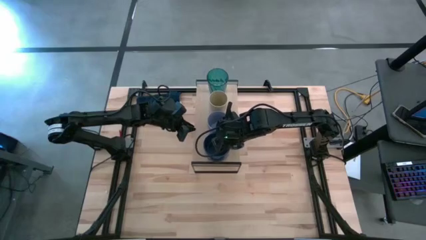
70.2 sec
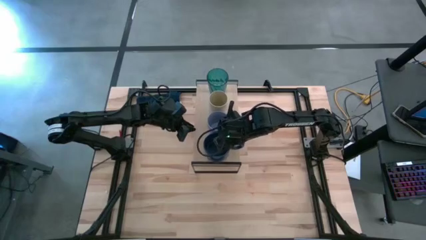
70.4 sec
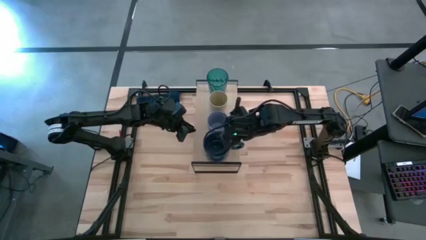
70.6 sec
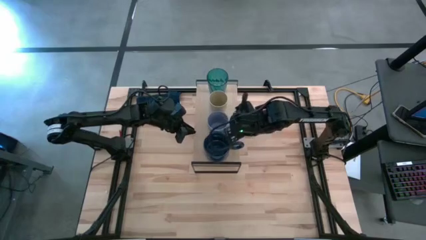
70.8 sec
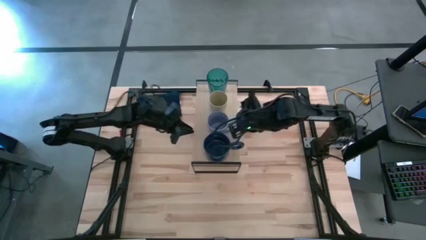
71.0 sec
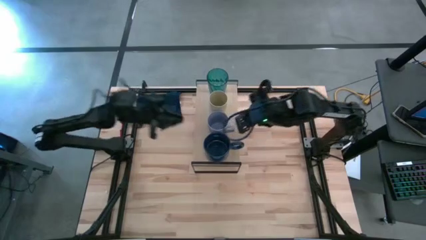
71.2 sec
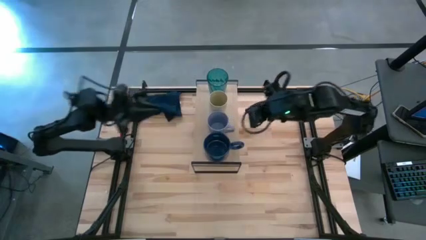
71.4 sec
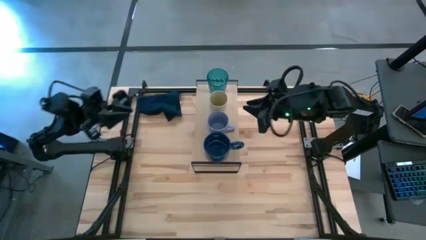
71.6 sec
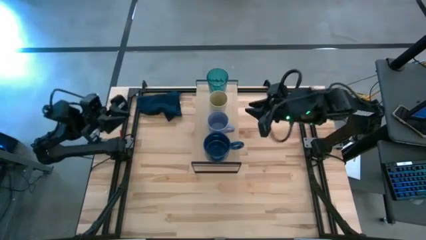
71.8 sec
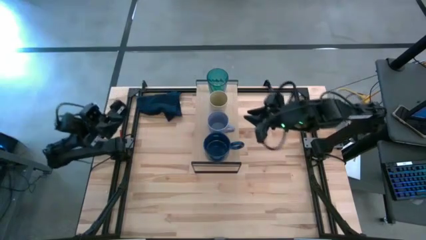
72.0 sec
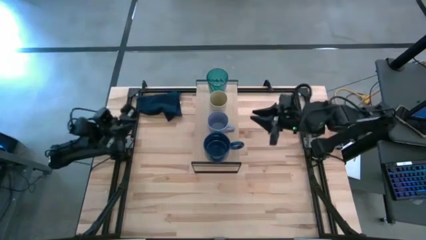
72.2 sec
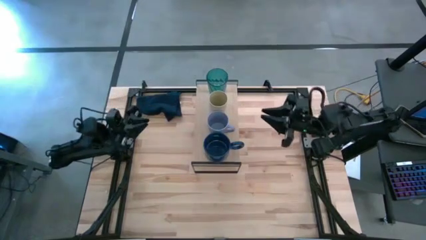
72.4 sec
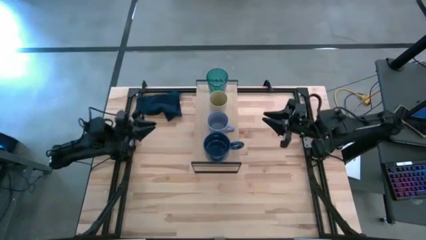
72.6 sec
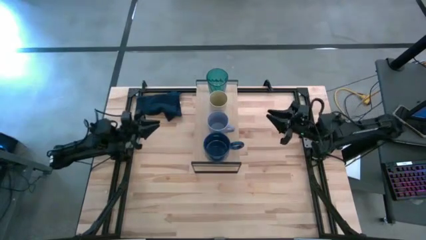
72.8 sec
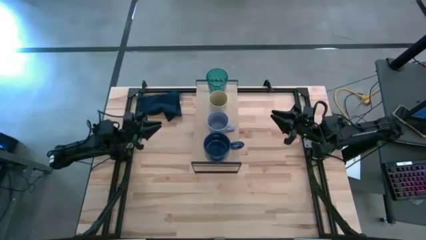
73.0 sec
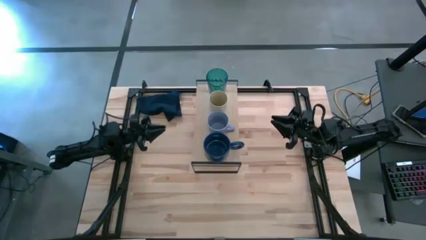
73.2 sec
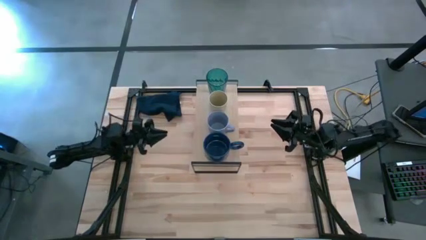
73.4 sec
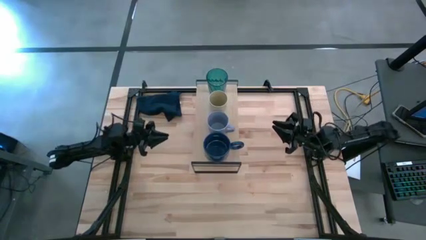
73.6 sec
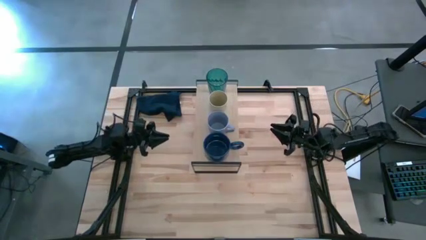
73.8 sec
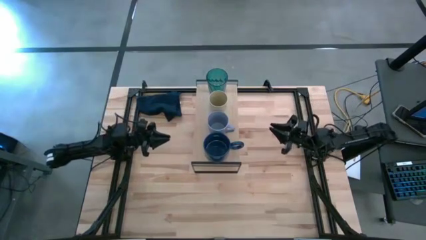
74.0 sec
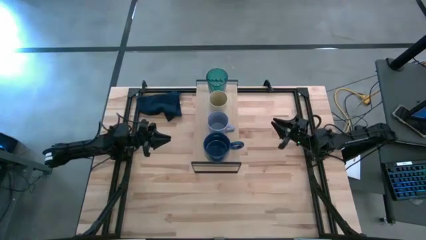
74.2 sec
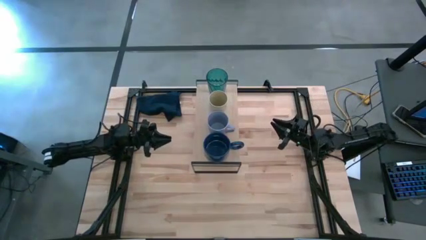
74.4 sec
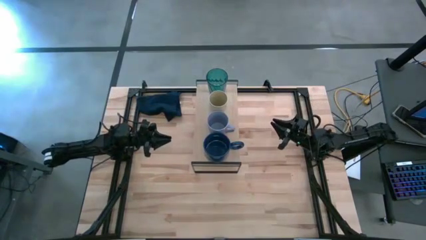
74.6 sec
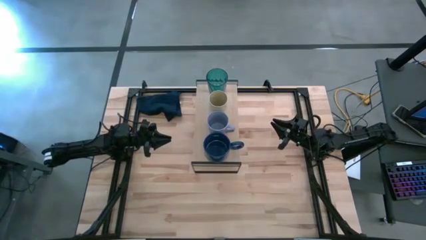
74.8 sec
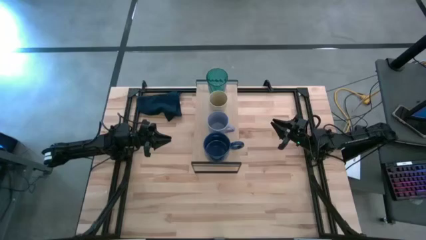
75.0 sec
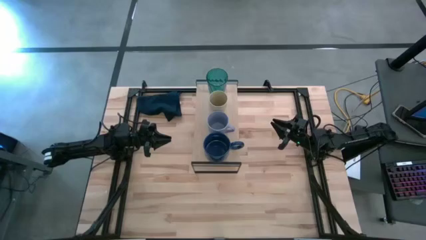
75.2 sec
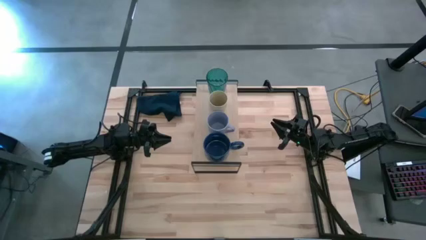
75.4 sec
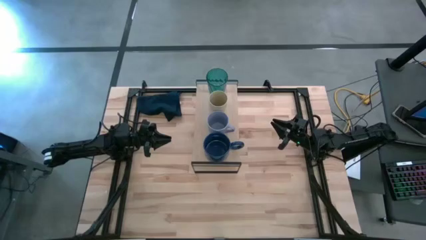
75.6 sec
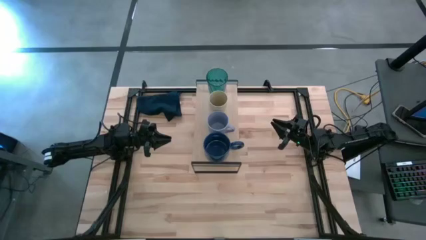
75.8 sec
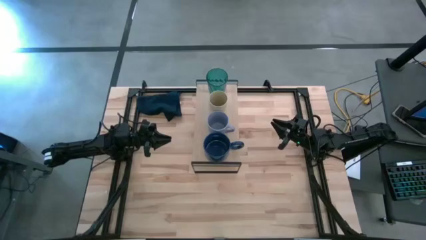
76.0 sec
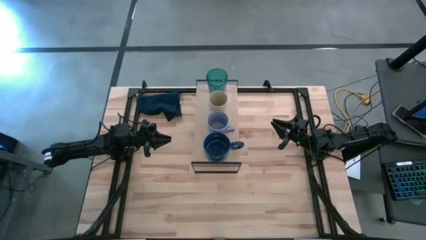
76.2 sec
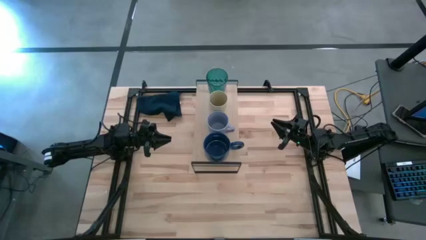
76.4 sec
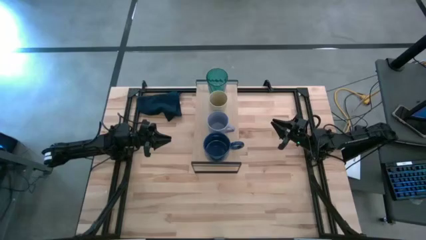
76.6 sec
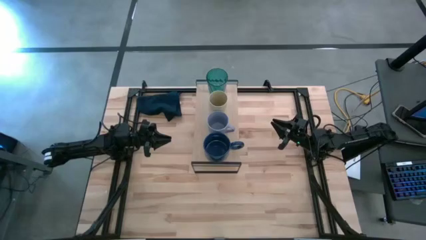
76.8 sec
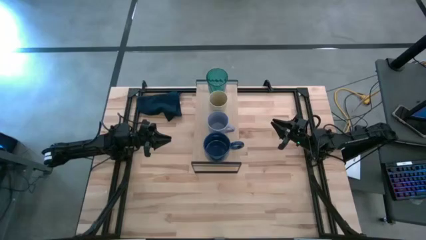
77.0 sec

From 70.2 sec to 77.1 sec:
Task: Stack small to large cups/mugs on shelf
Return to Home Position

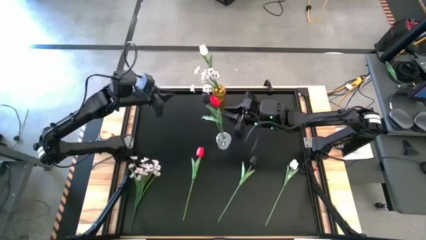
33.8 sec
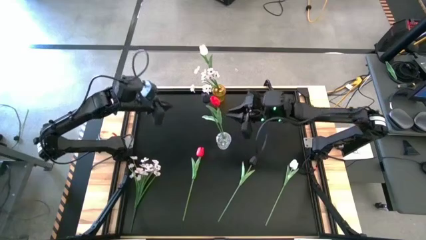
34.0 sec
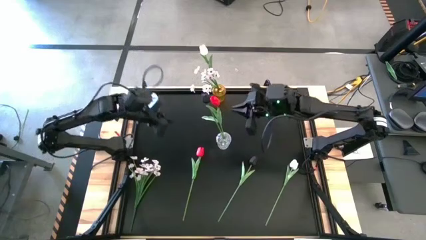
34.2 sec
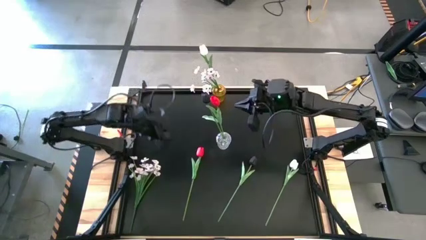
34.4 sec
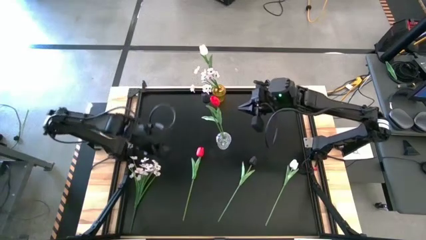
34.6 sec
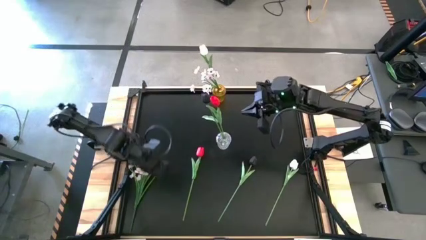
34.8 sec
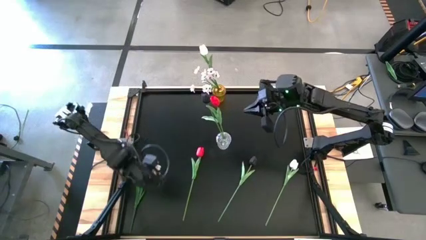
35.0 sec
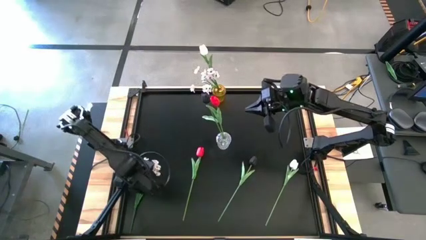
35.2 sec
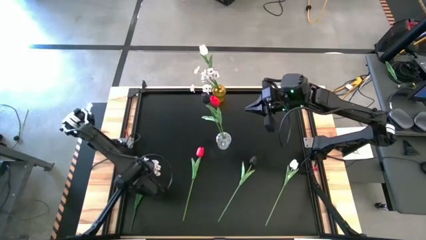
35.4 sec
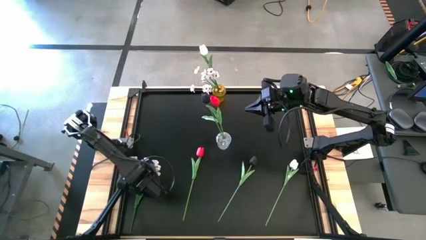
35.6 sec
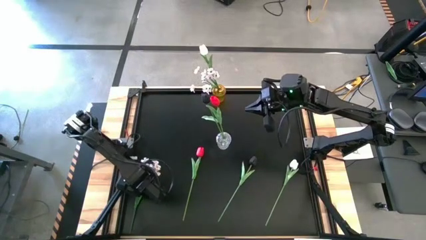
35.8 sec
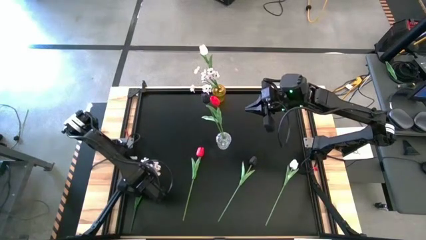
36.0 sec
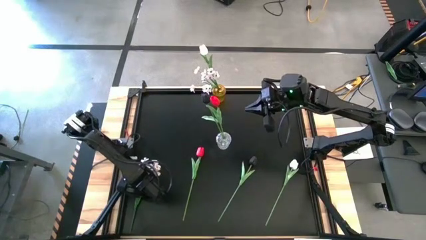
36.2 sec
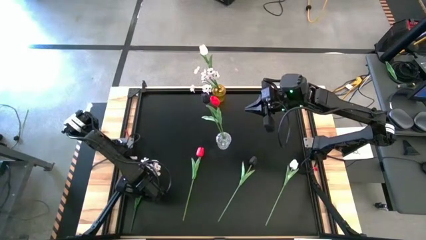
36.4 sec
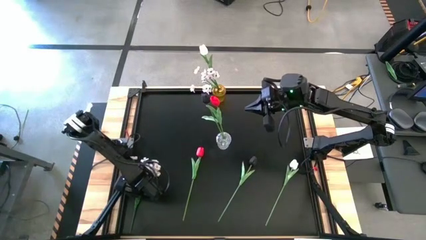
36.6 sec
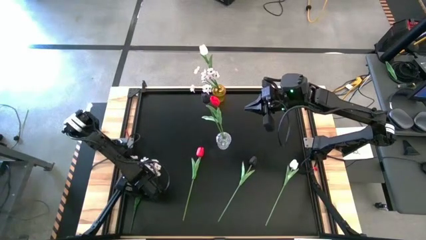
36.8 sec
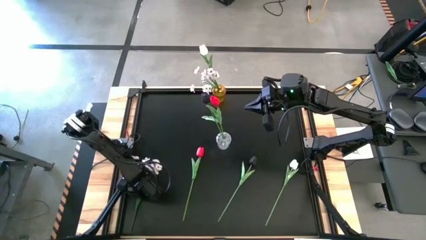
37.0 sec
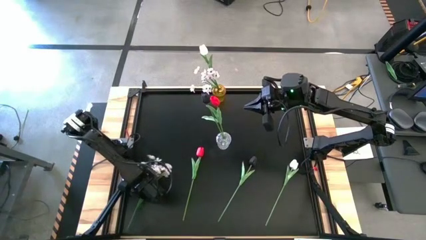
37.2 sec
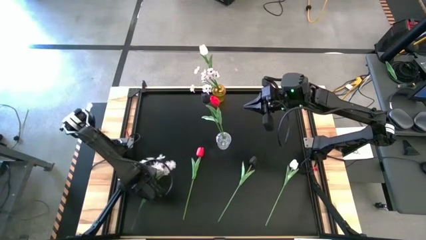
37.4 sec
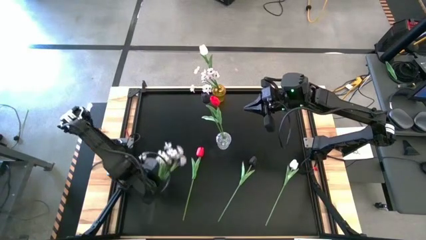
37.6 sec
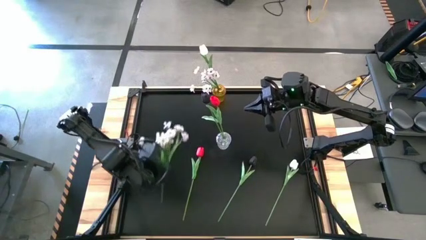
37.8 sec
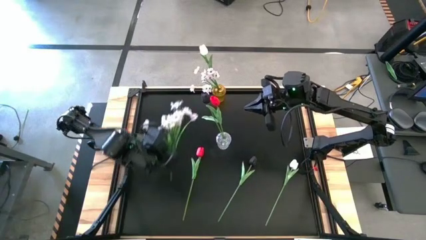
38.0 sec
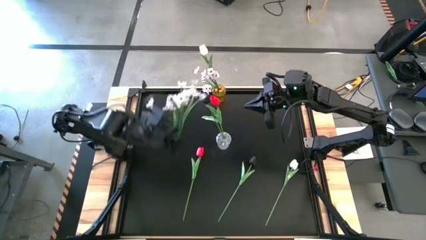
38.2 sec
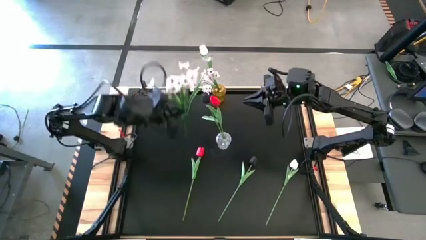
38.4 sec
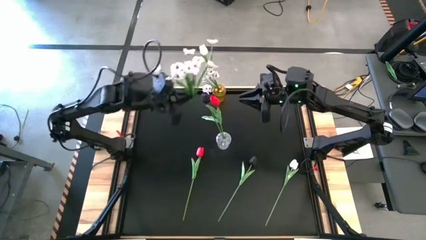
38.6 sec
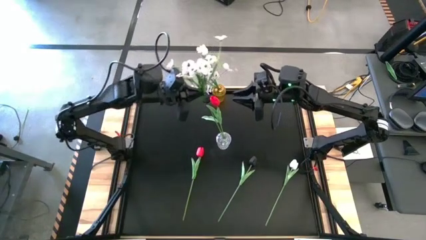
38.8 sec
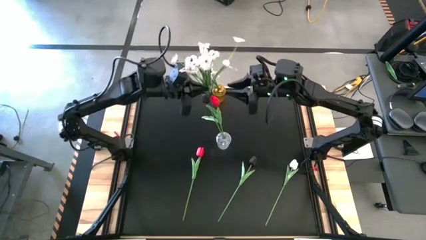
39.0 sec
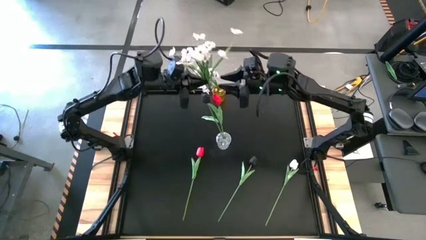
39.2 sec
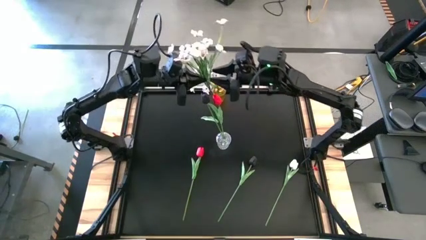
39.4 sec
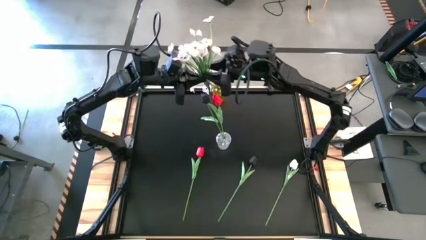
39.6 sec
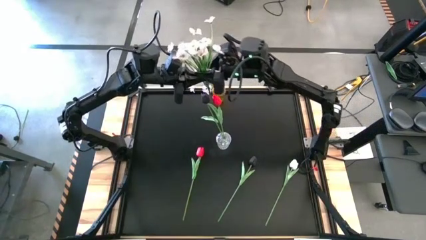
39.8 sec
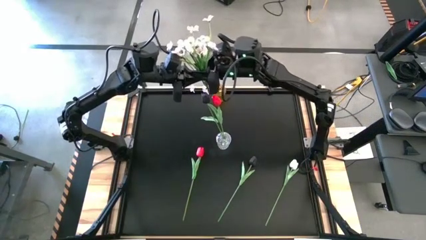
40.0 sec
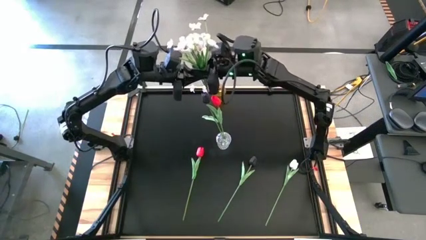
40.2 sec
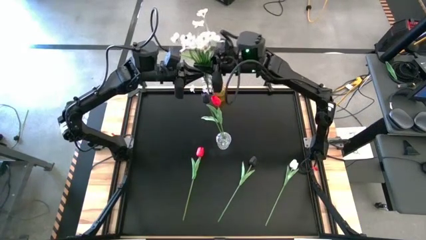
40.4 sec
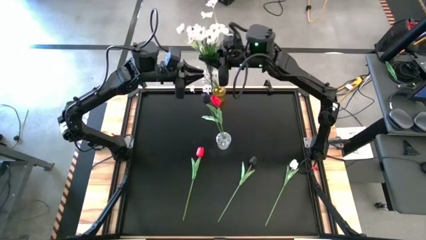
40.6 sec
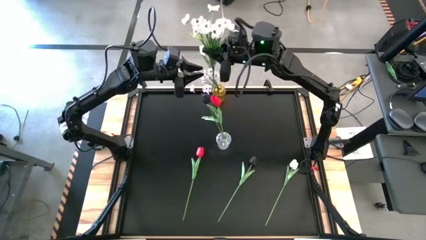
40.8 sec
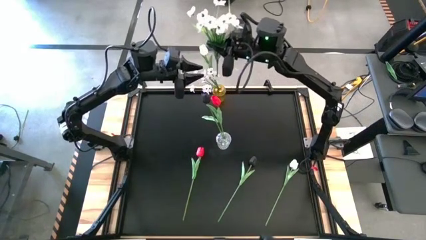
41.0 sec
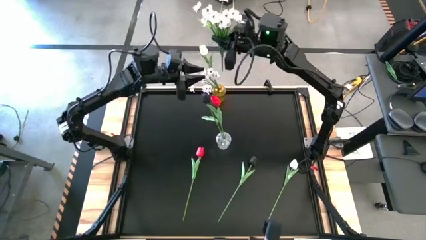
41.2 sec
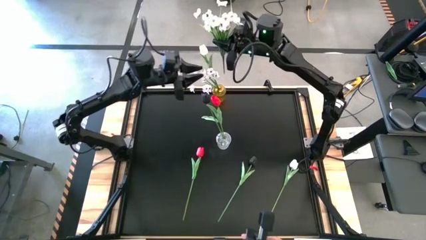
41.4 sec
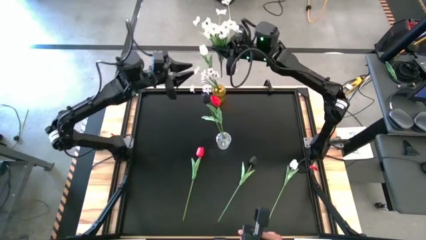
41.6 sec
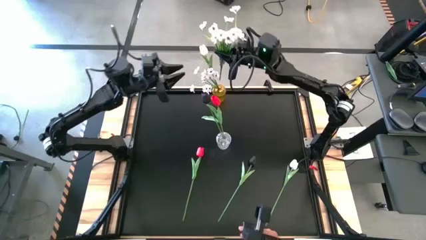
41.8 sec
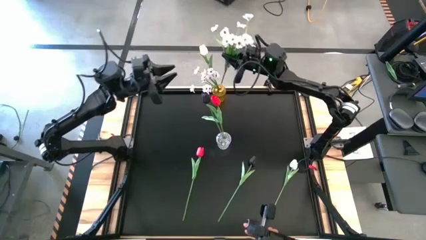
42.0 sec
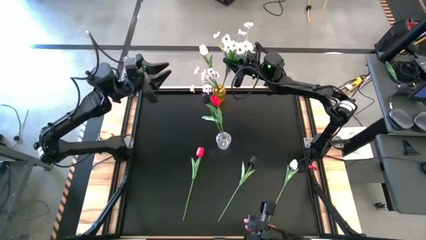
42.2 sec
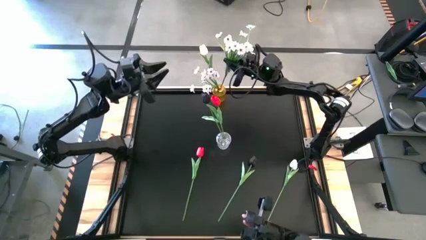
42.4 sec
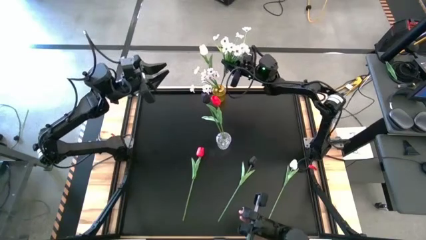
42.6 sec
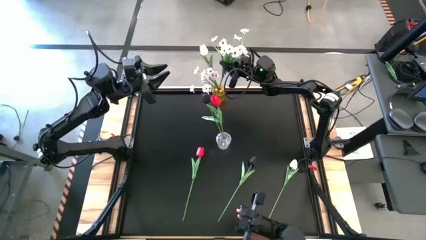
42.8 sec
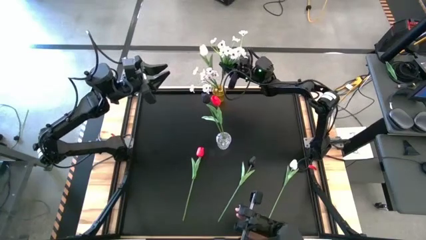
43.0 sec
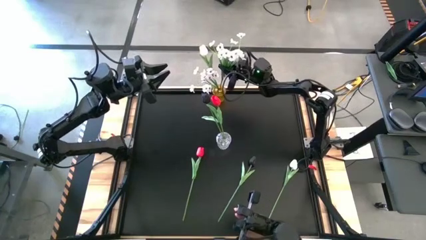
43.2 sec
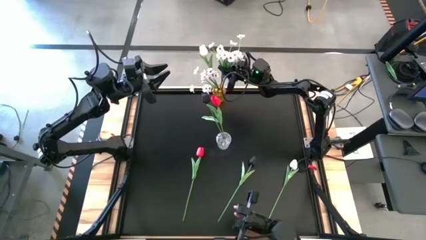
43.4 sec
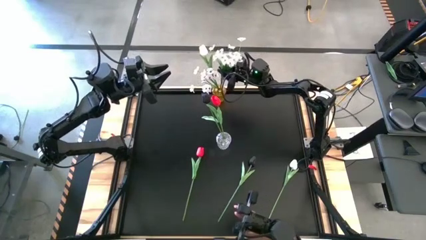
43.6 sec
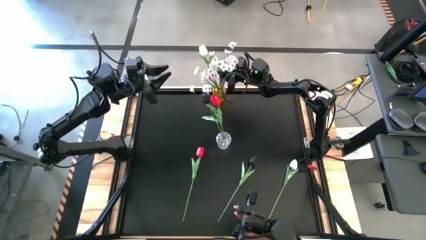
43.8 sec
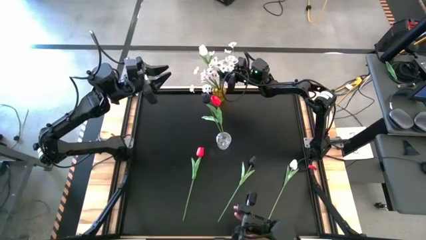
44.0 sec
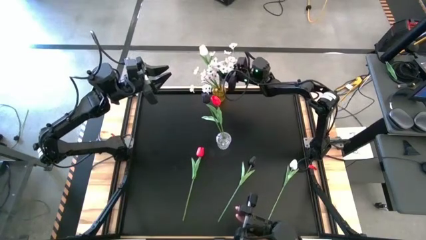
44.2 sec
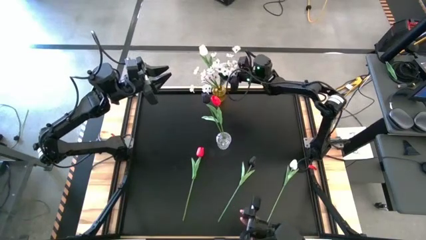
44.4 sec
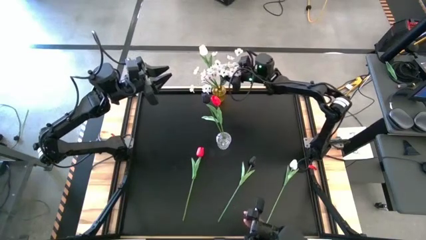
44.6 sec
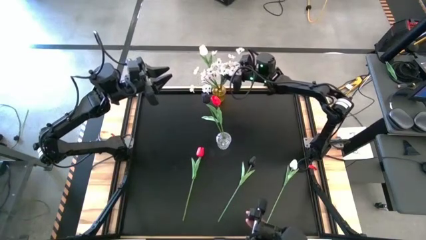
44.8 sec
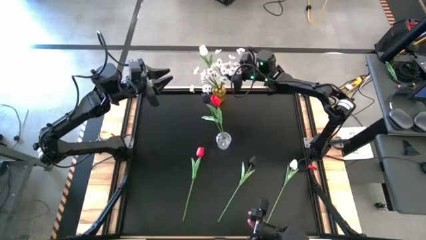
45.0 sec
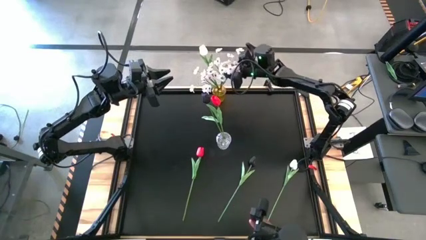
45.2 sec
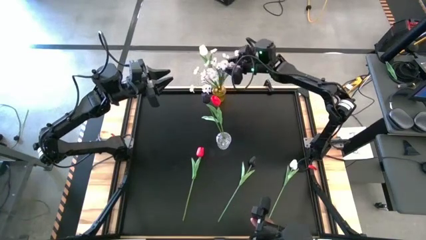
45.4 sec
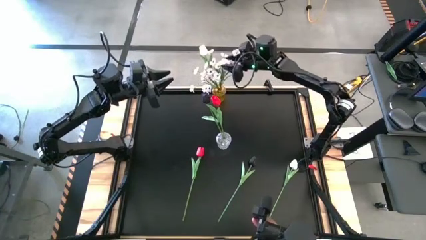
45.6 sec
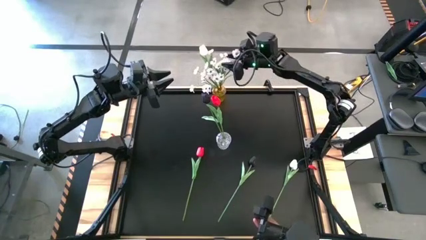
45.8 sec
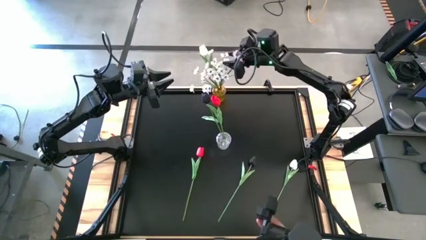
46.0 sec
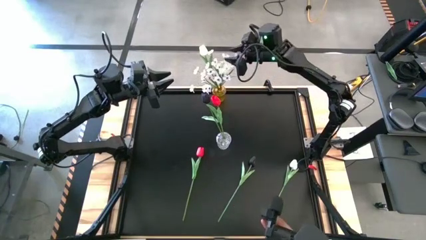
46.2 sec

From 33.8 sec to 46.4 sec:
Task: Sort flowers into vase by color
Put the white flowers into the yellow vase
